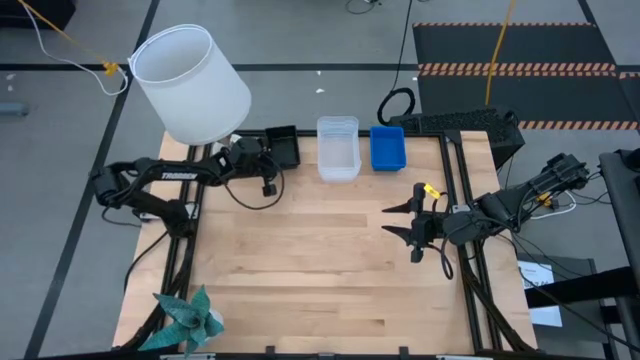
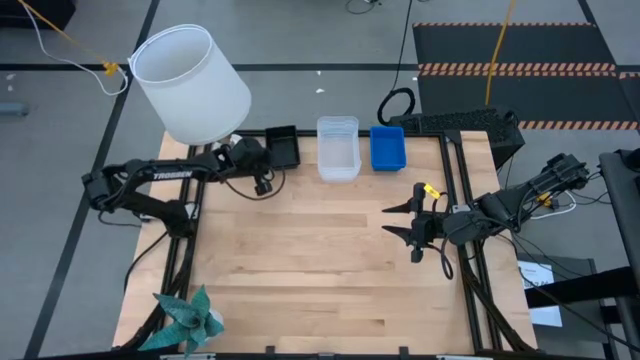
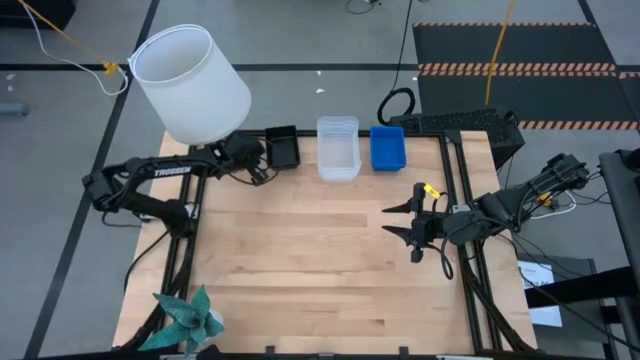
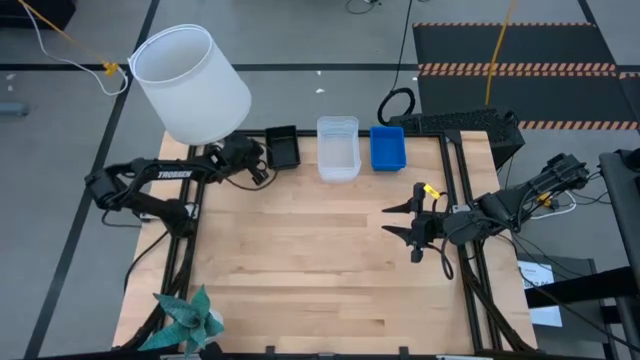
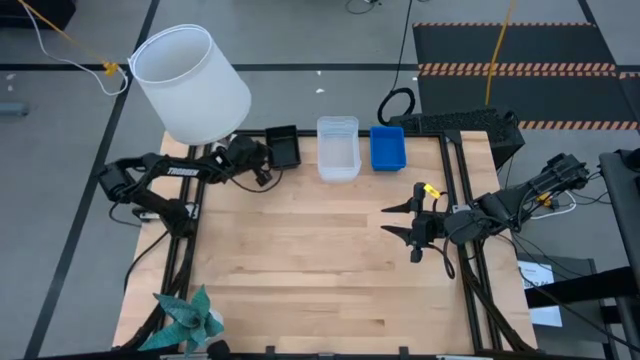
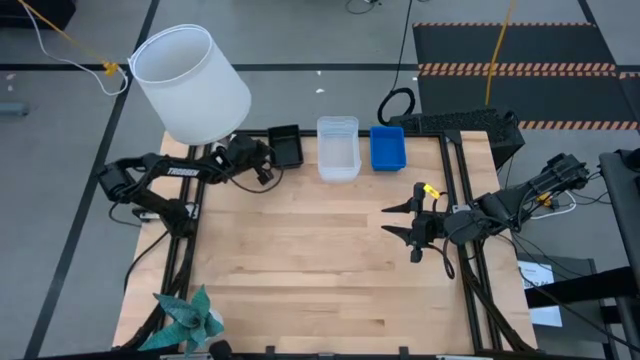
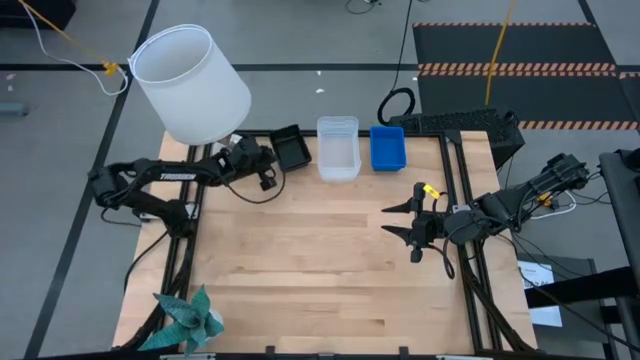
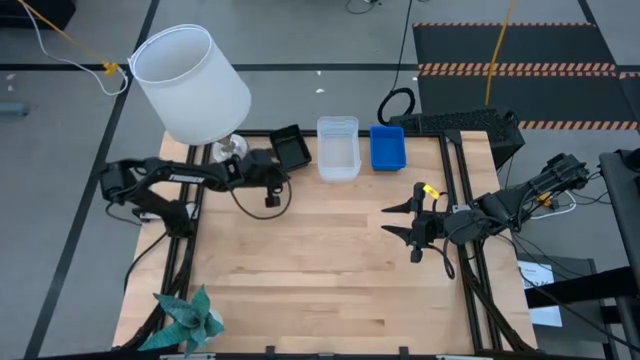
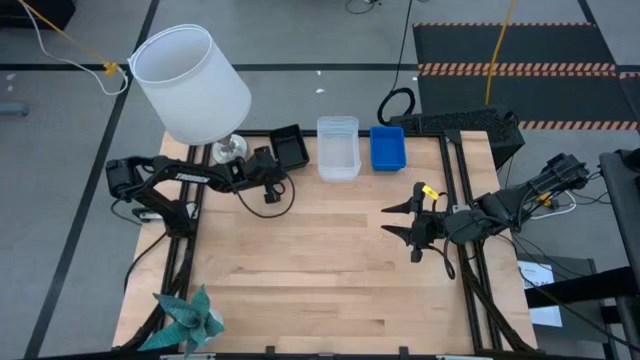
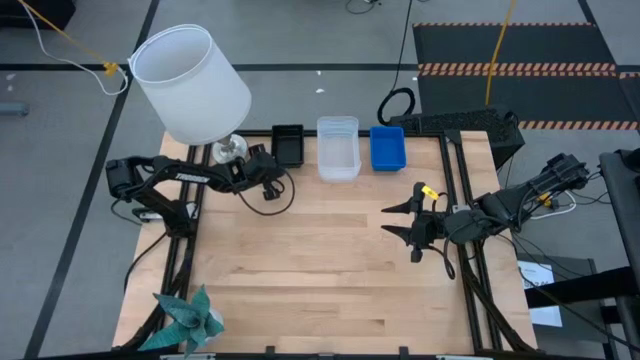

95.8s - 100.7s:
Adjust the stacked black bins

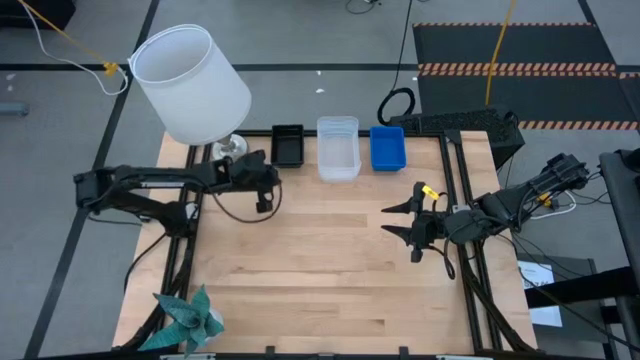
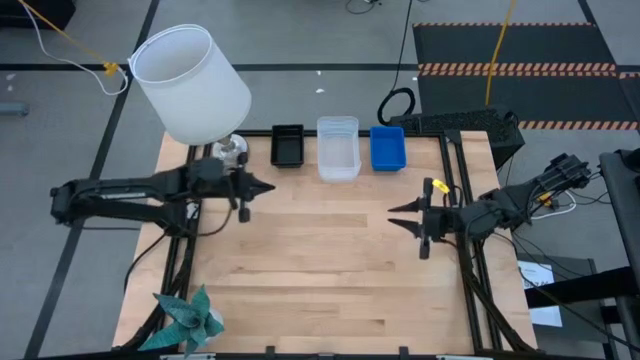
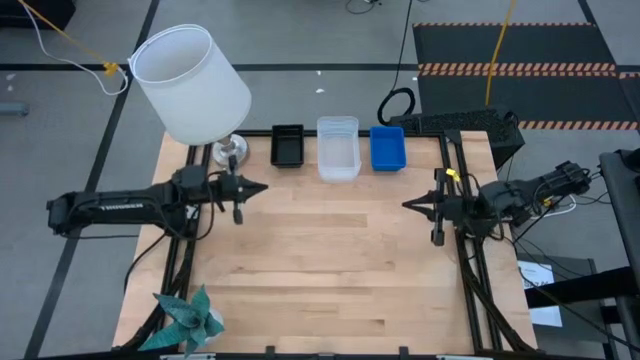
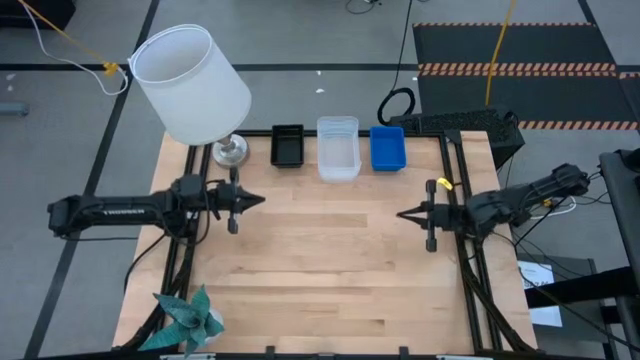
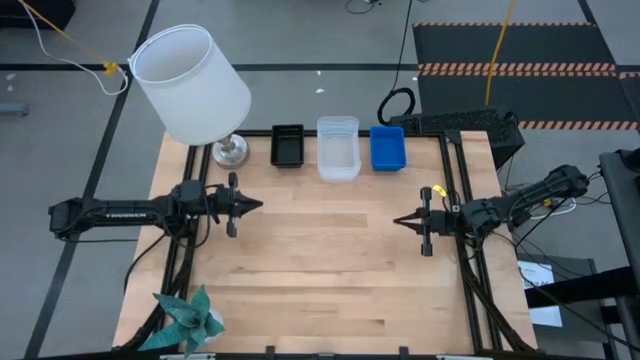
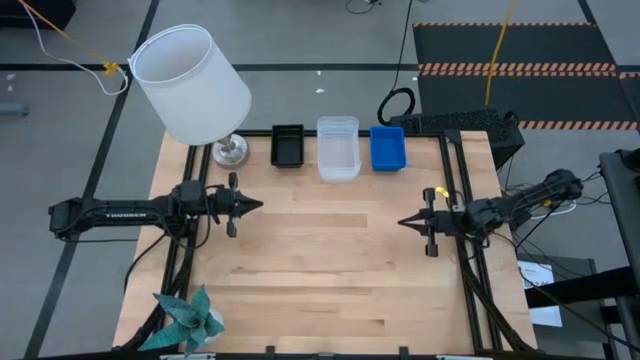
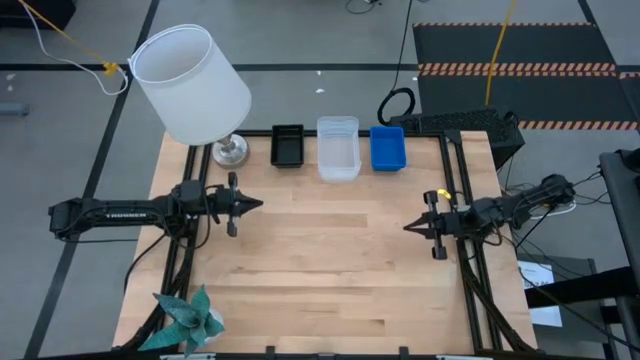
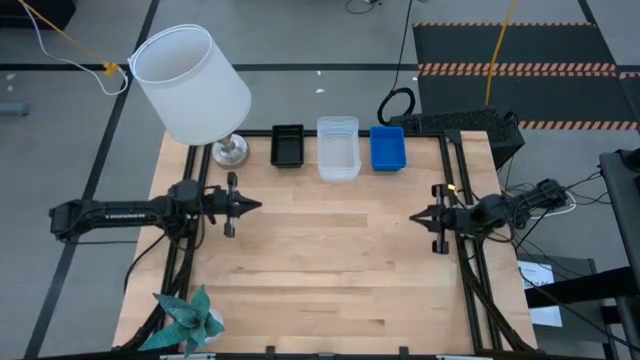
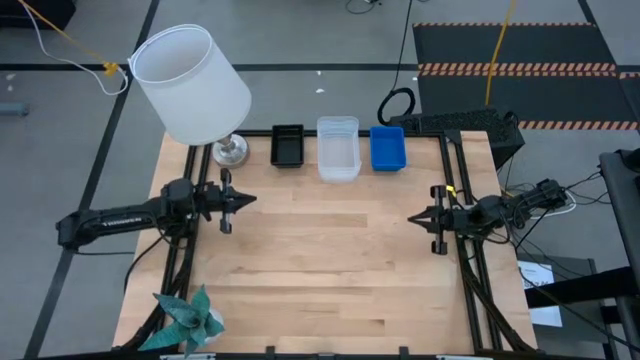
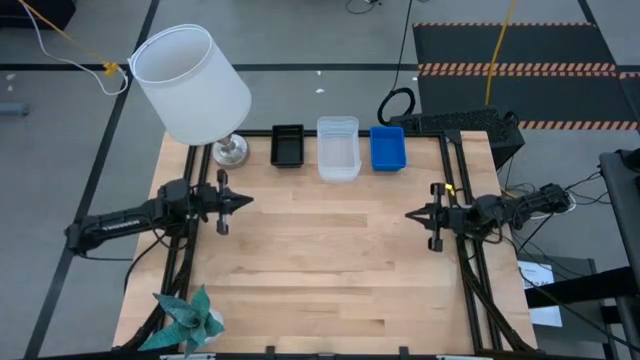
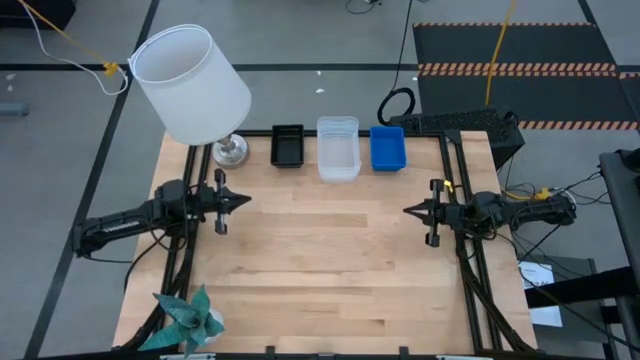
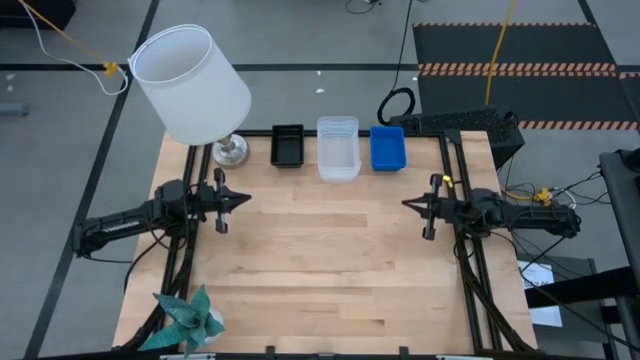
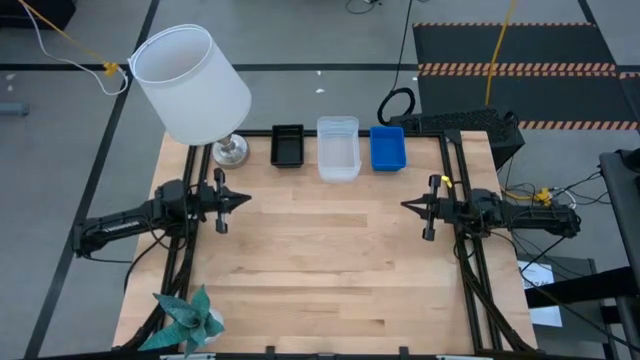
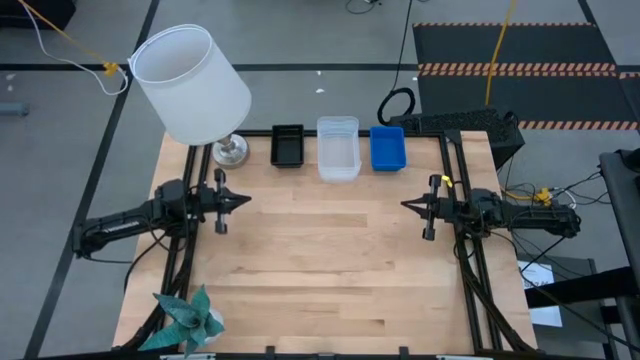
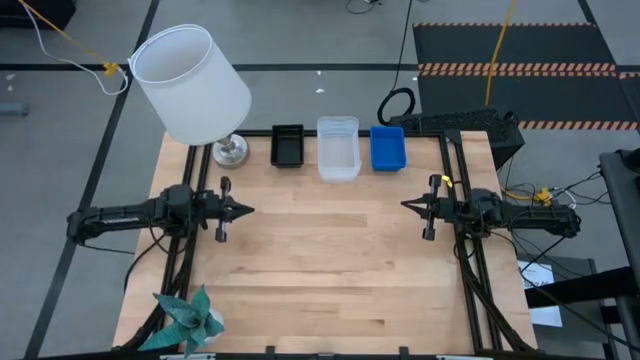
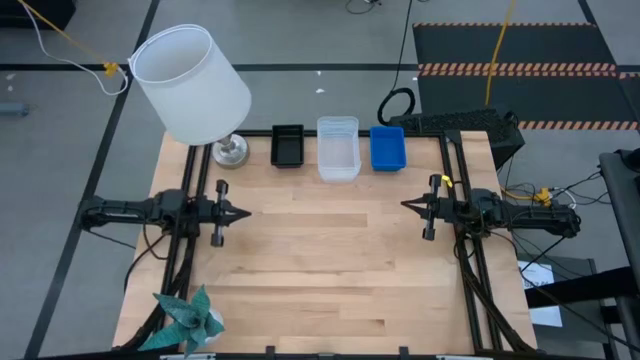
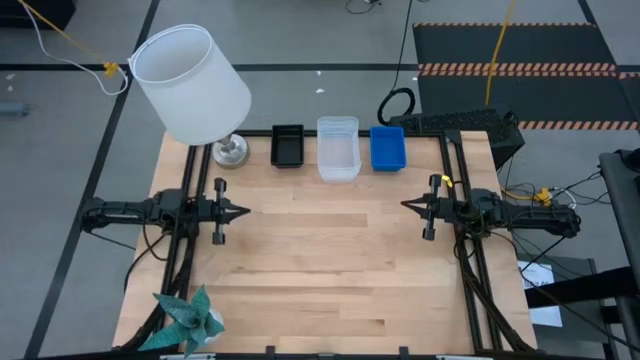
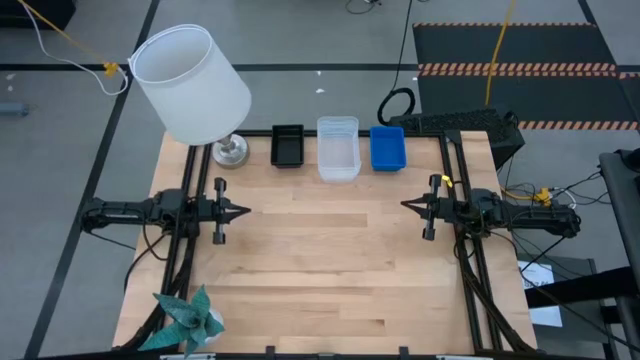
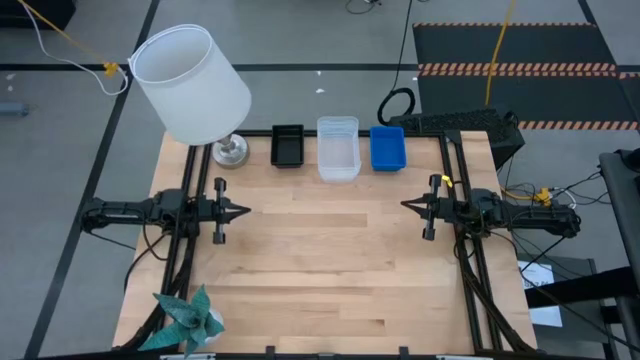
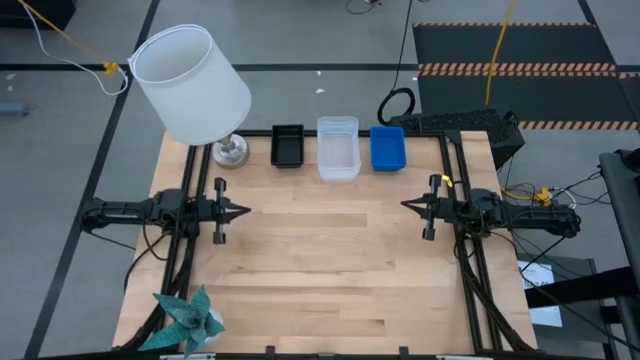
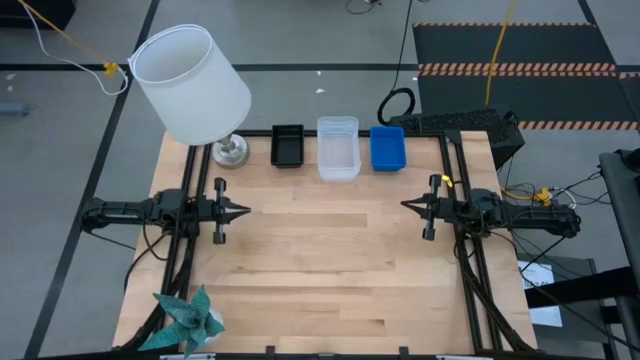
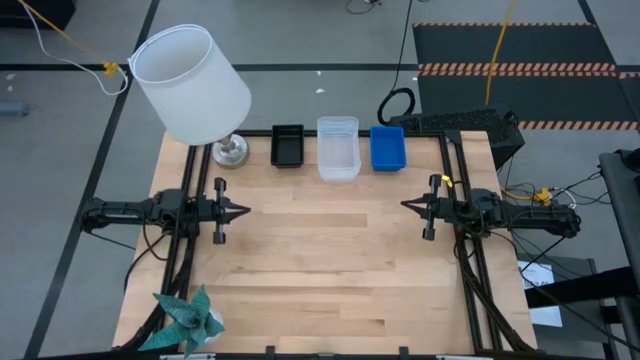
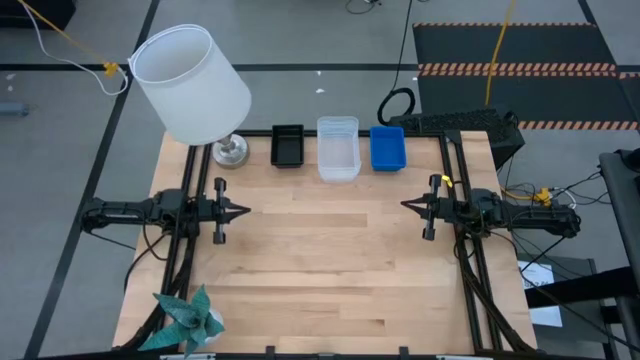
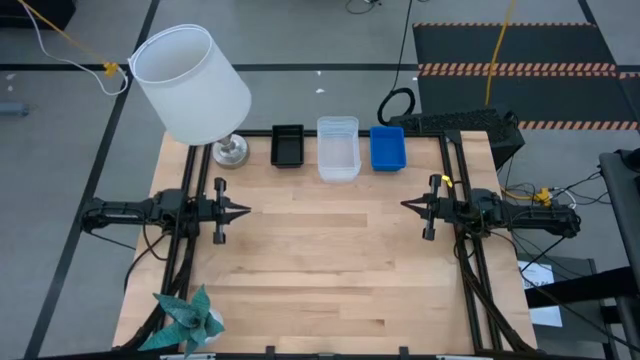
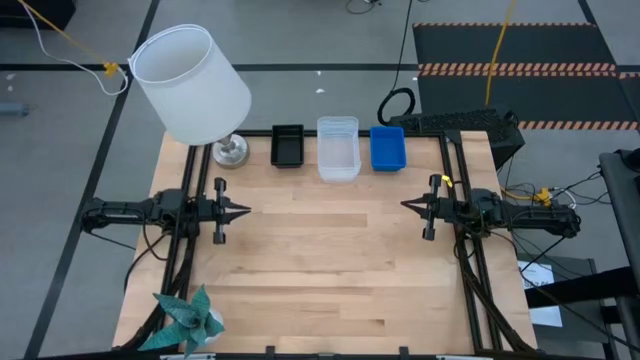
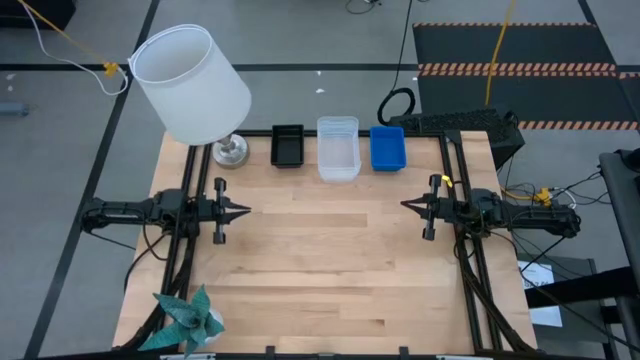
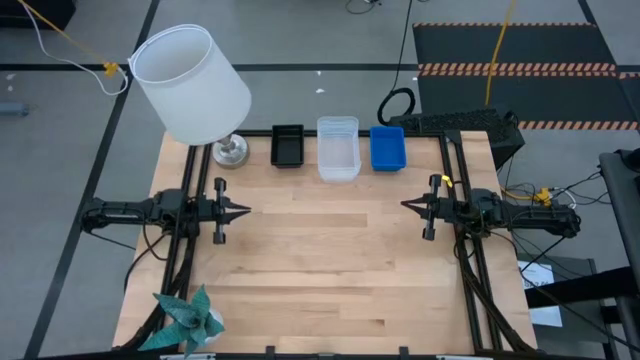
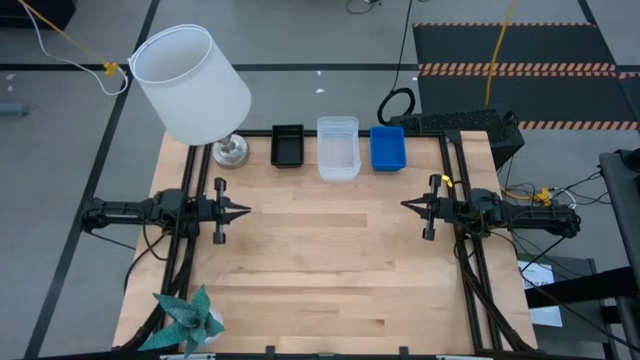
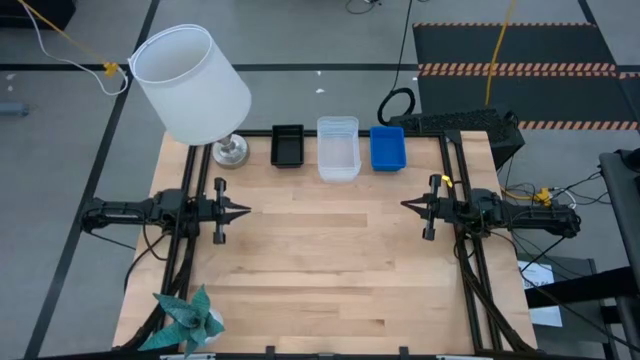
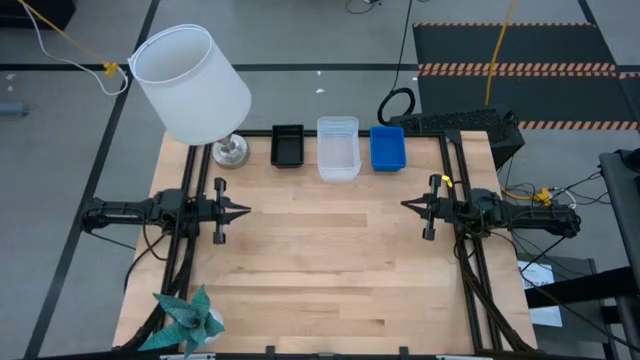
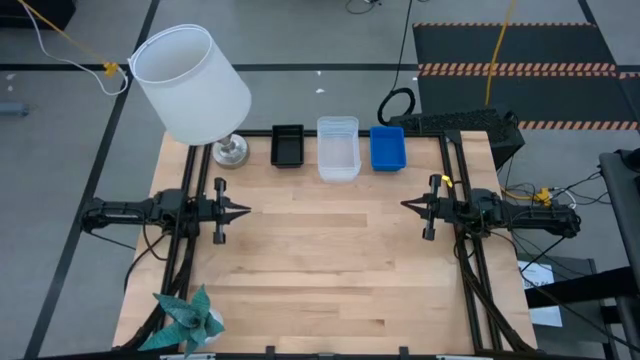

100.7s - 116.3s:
Return to Home Position
